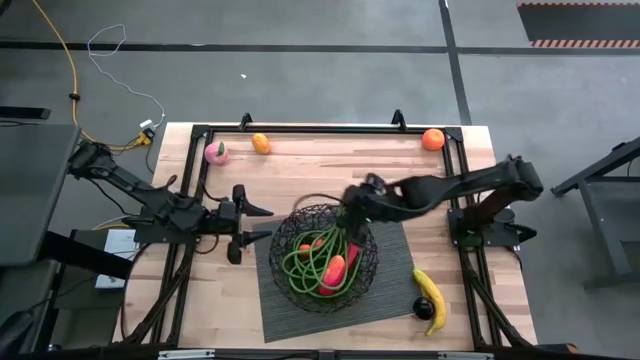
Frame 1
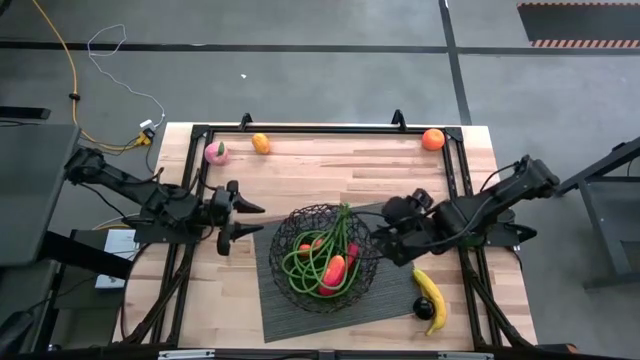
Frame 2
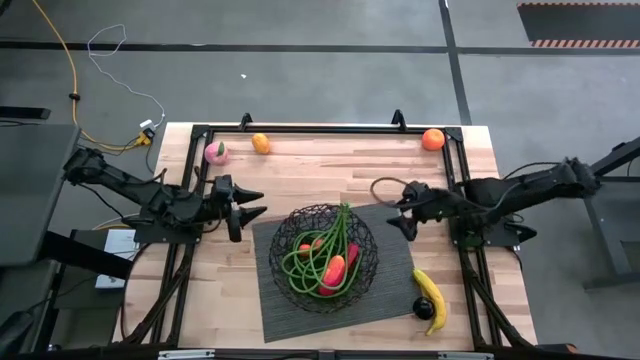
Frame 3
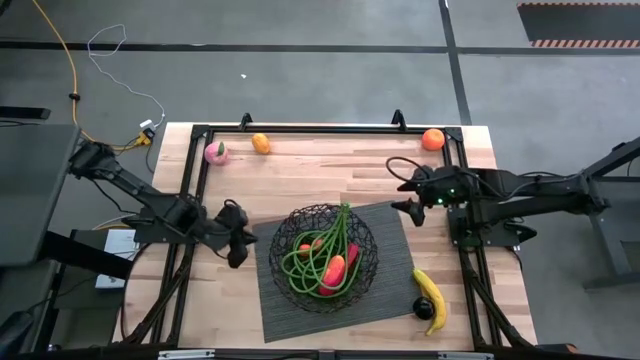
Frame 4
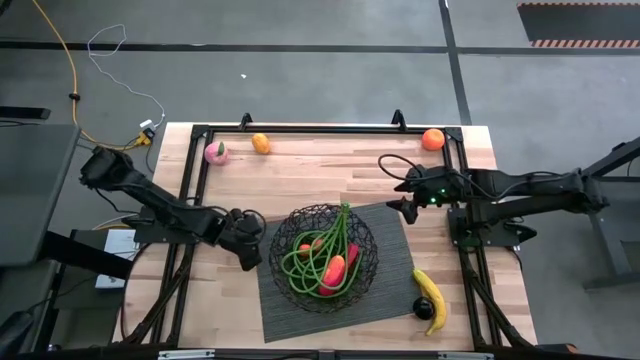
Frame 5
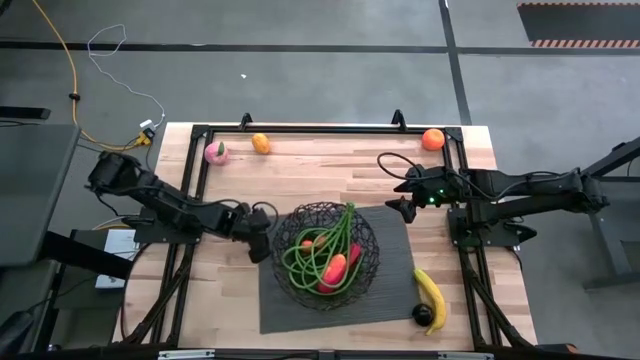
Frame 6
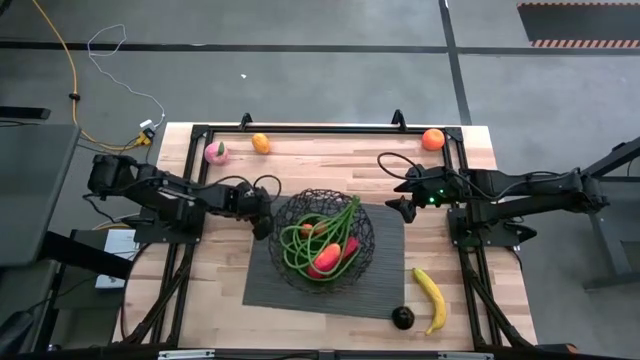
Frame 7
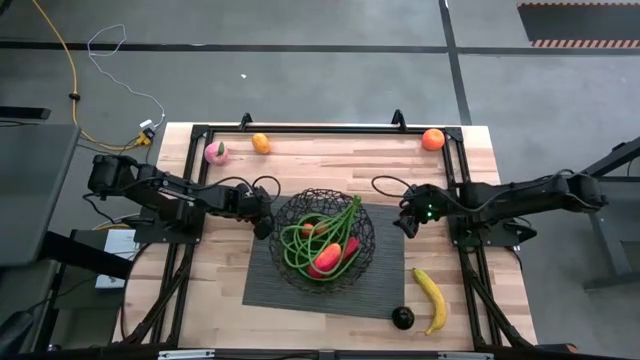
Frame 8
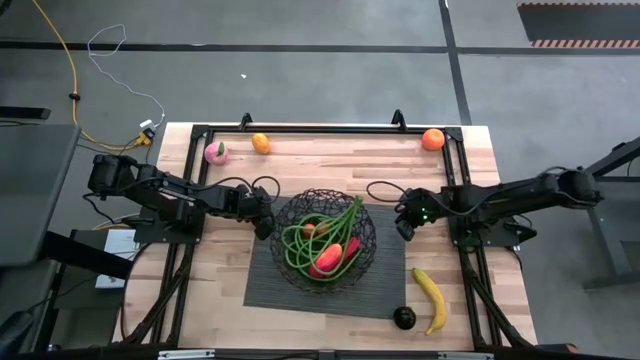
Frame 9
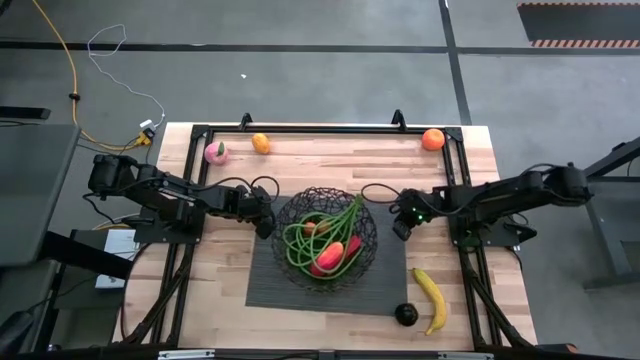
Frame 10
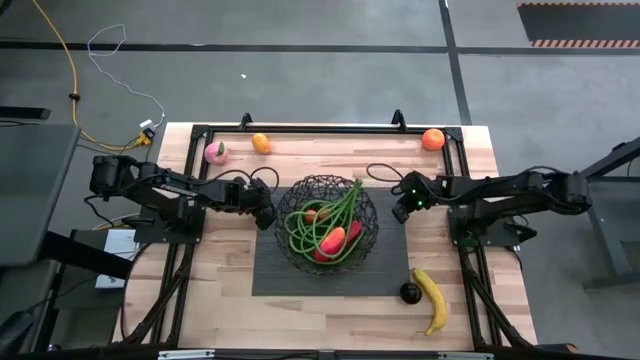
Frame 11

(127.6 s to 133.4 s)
Task: Build produce basket
Adjust the gray mat

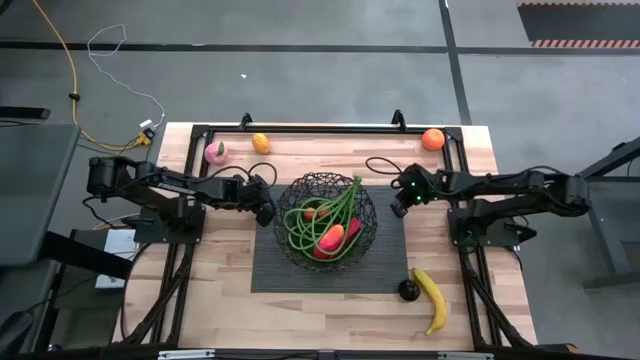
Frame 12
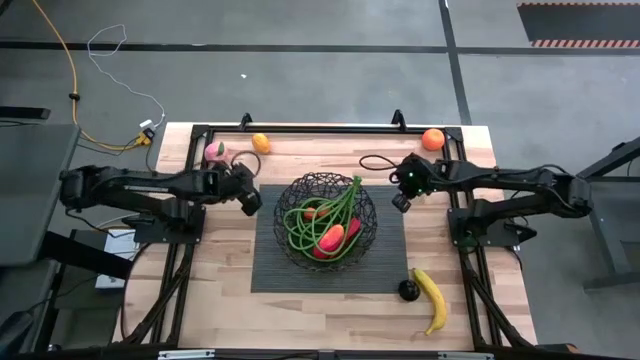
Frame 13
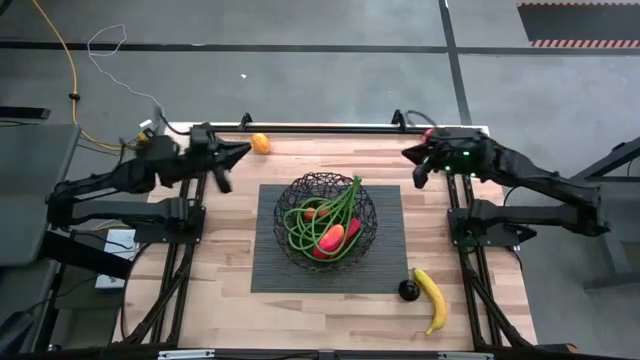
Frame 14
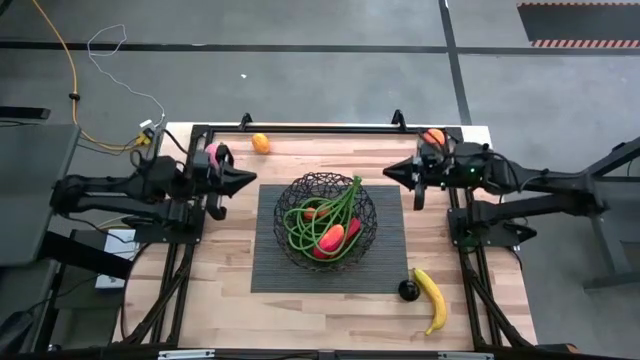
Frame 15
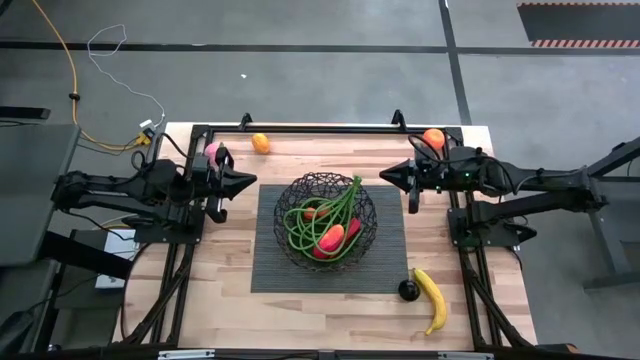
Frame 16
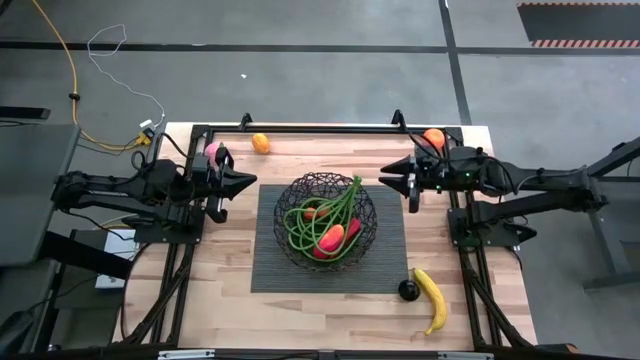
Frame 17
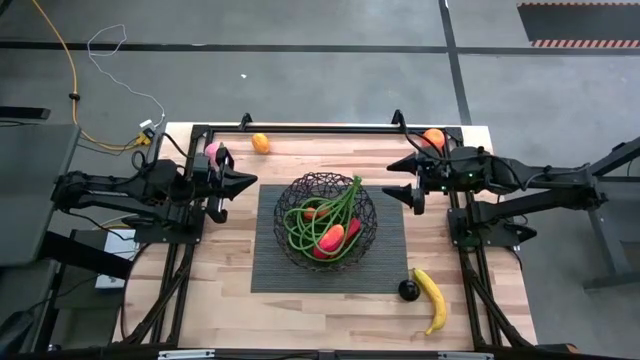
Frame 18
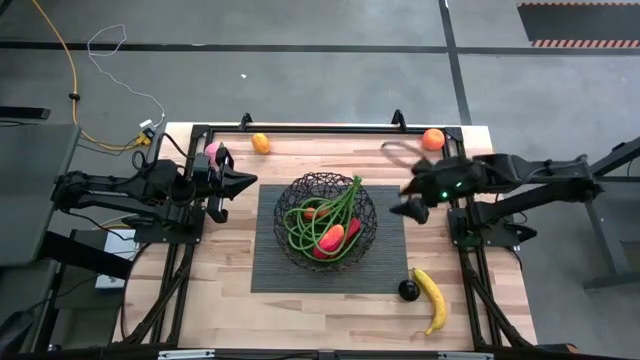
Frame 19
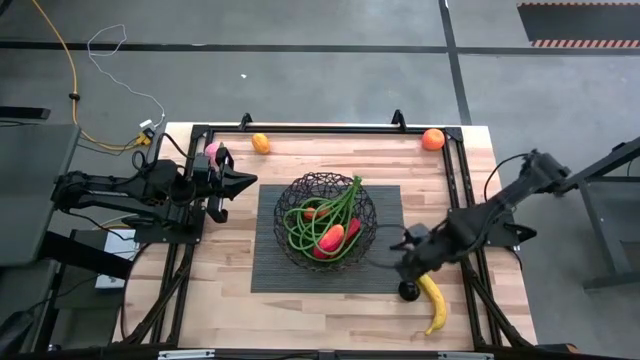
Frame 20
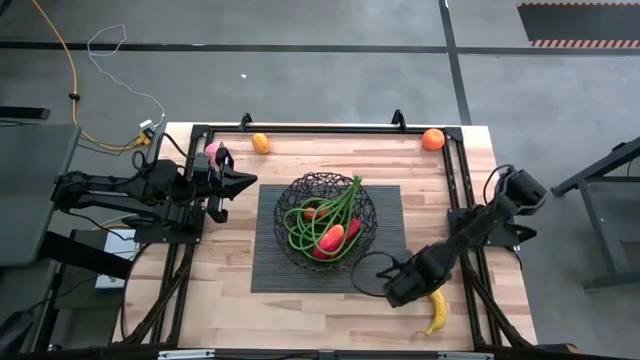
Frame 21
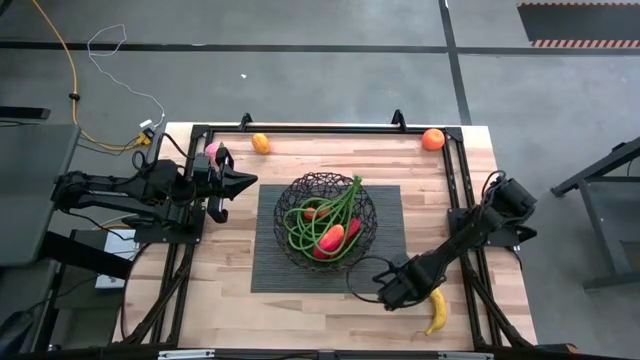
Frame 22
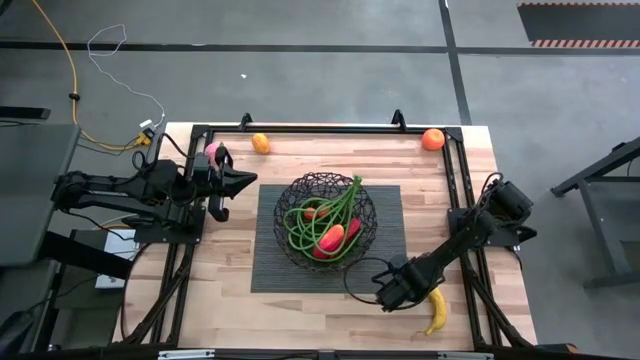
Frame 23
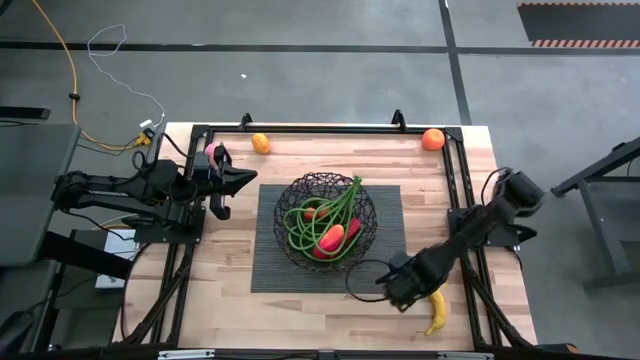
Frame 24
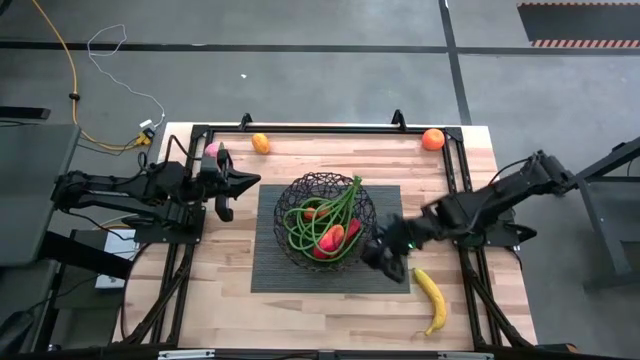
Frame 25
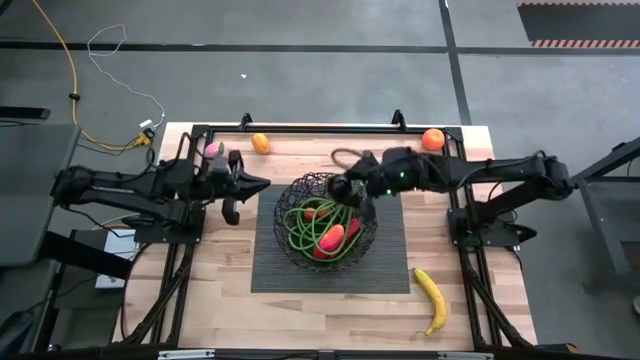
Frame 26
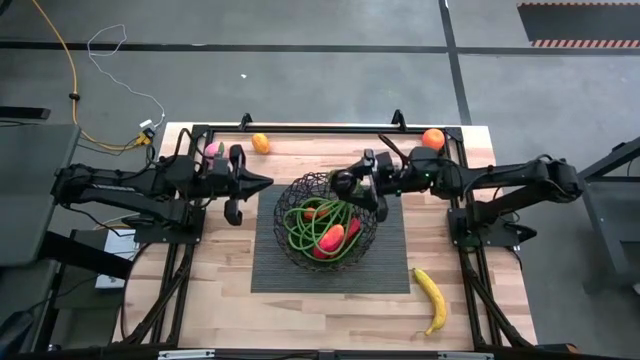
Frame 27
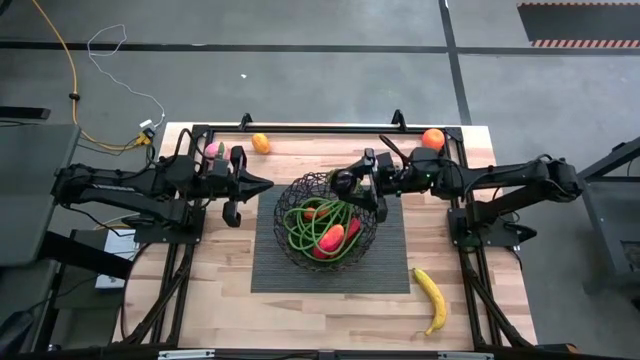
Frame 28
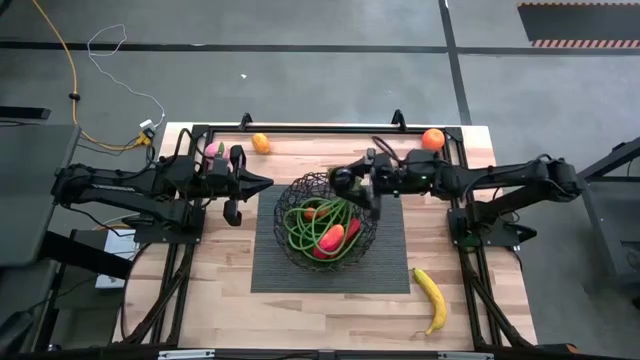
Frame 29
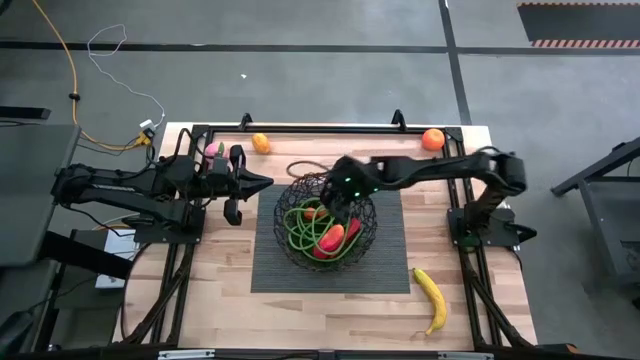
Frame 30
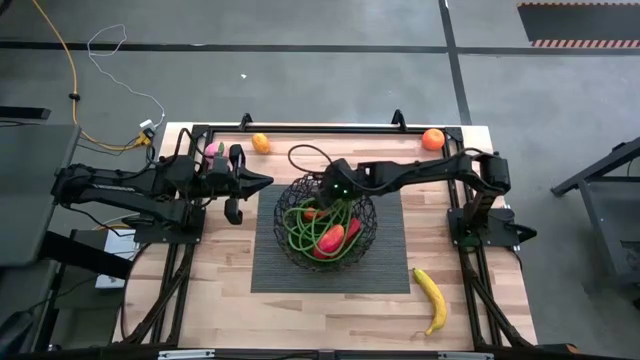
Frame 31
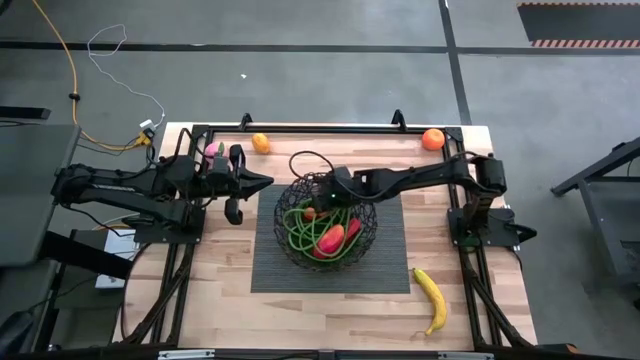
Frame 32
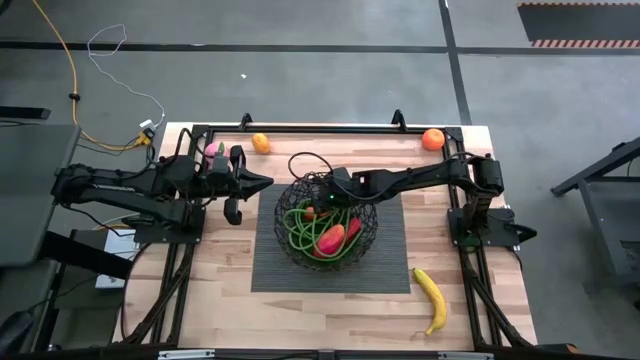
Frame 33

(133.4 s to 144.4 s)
Put the purple mangosteen into the black wire basket

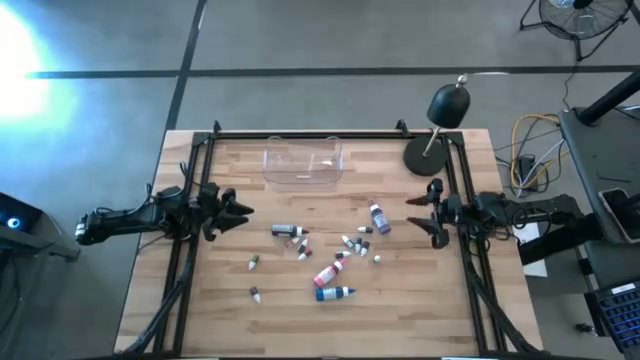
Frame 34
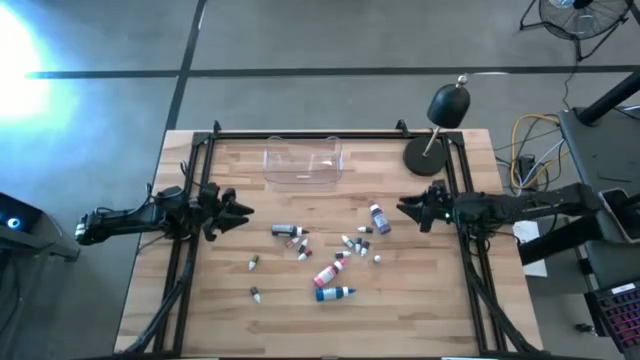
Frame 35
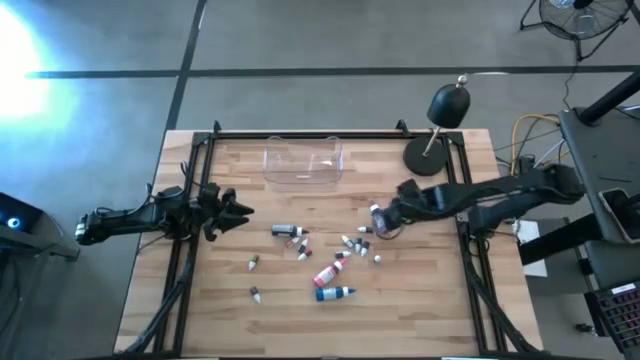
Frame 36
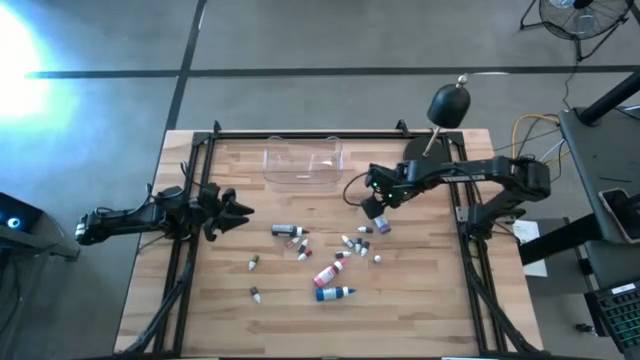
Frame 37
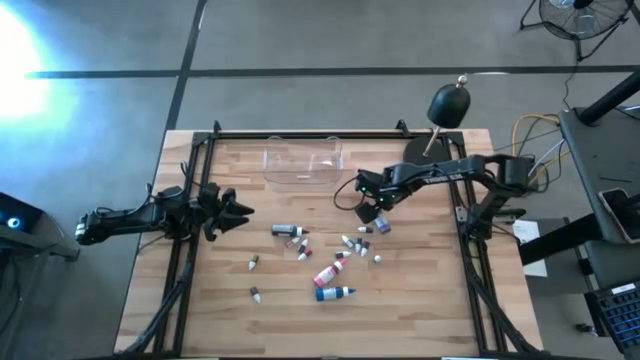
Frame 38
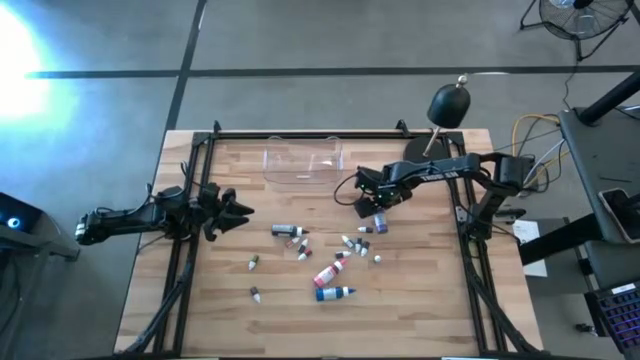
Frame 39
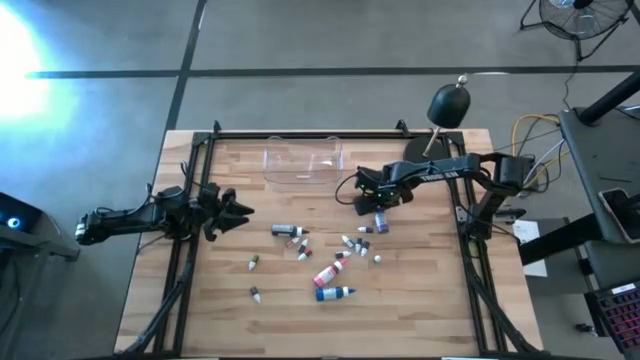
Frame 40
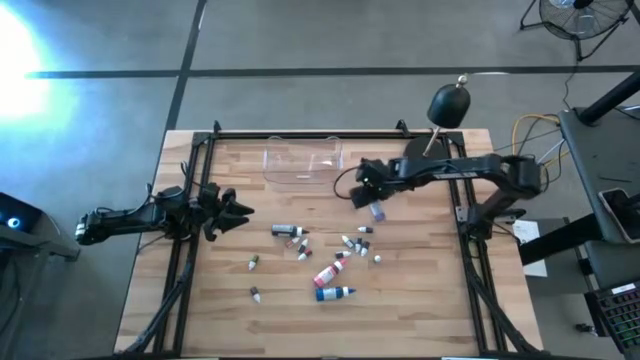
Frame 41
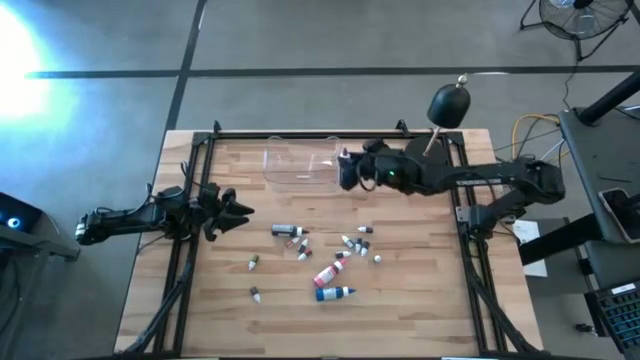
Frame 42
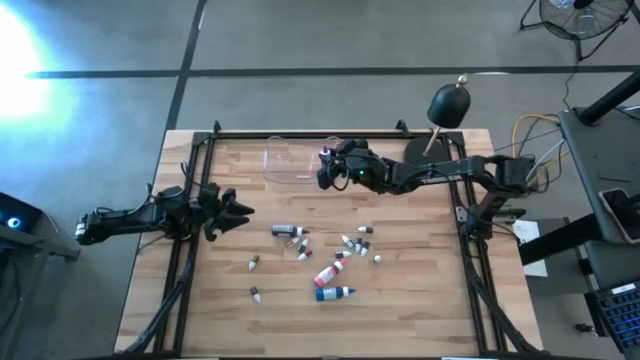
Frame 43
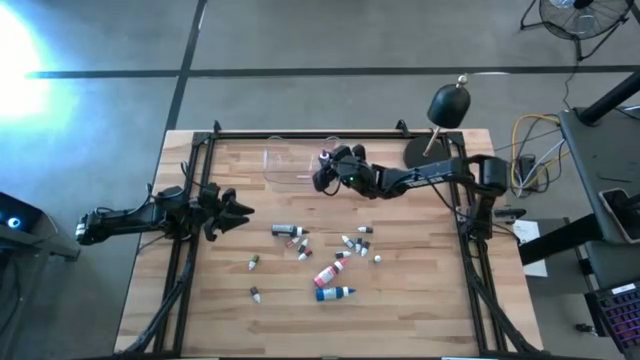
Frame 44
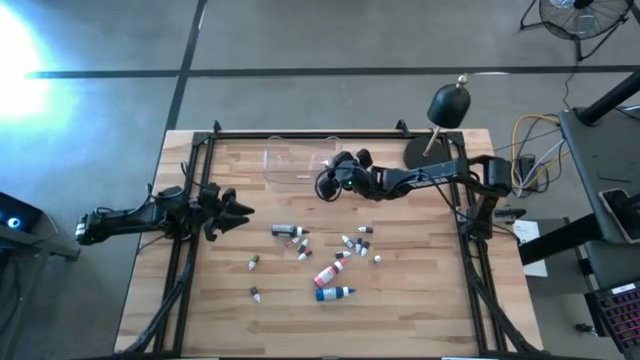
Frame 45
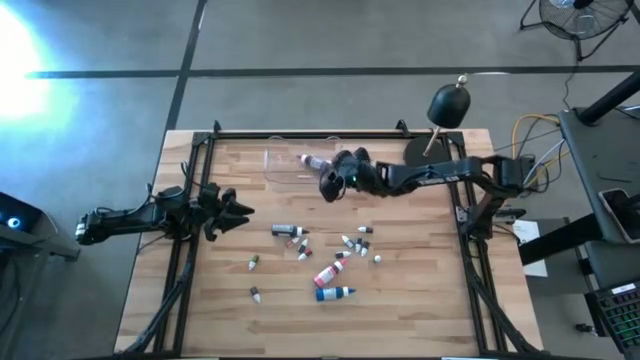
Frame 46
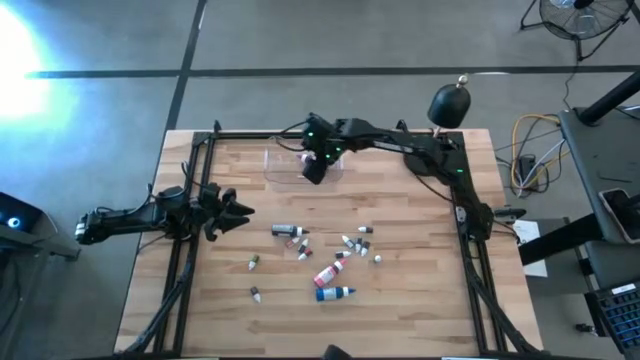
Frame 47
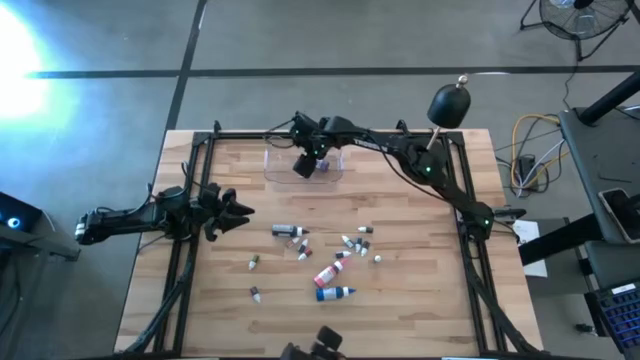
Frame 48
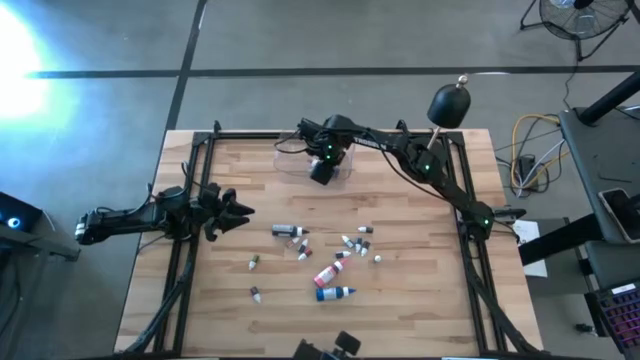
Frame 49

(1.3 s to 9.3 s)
Task: Pick & Place food coloring
Put the large violet food coloring bottle into the transparent bin
